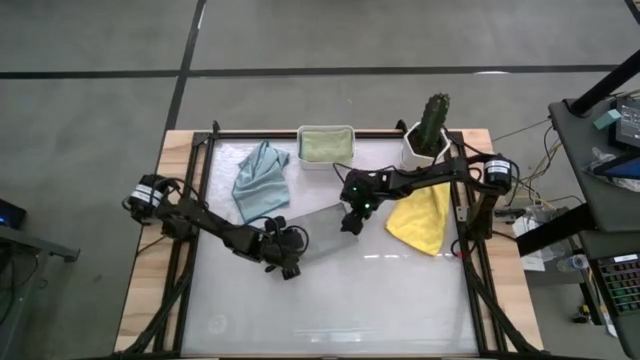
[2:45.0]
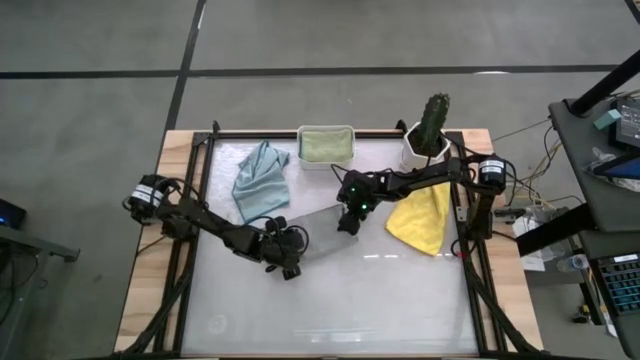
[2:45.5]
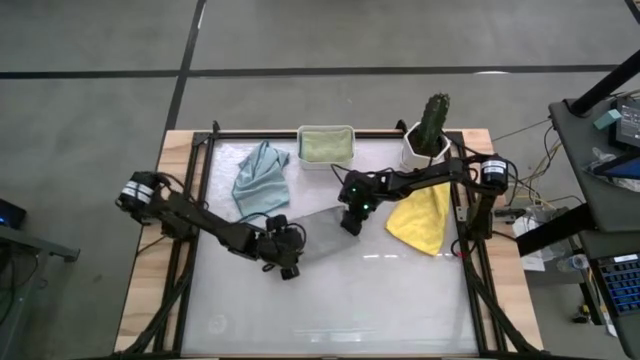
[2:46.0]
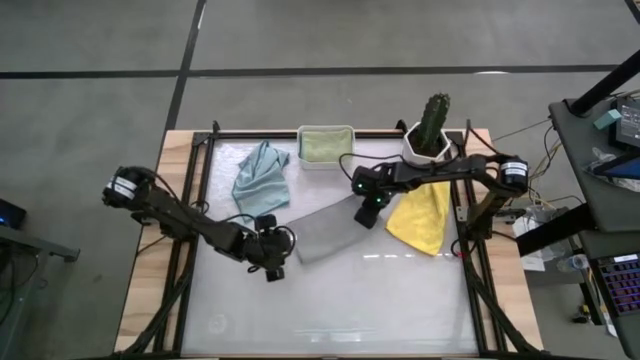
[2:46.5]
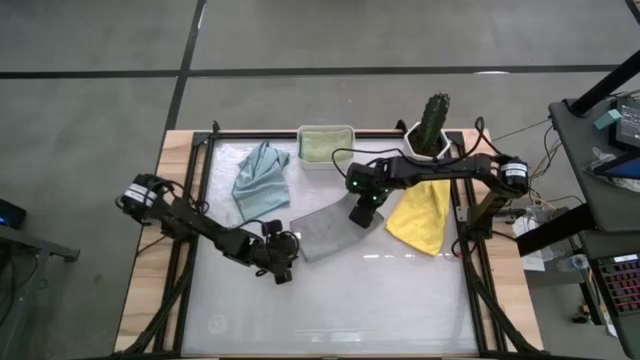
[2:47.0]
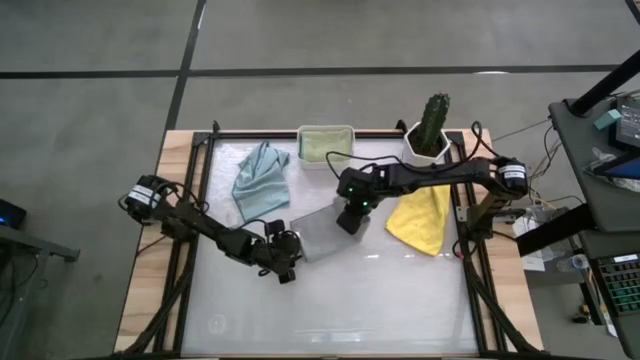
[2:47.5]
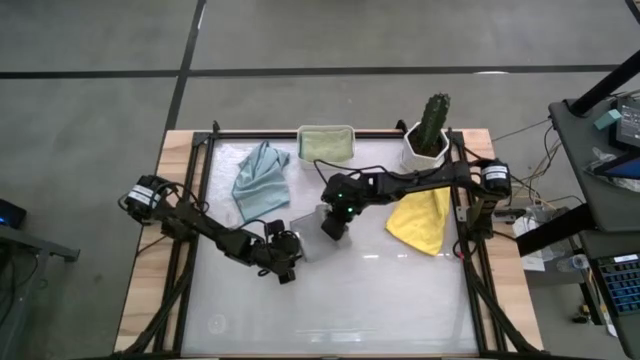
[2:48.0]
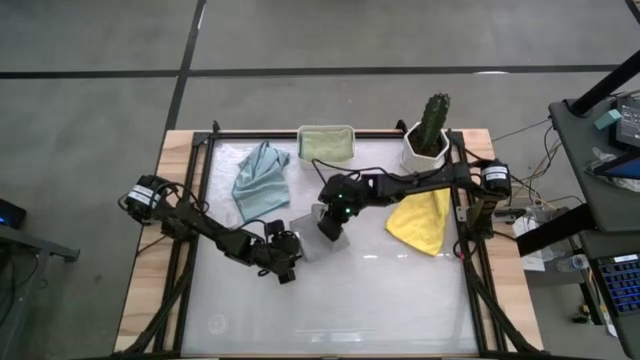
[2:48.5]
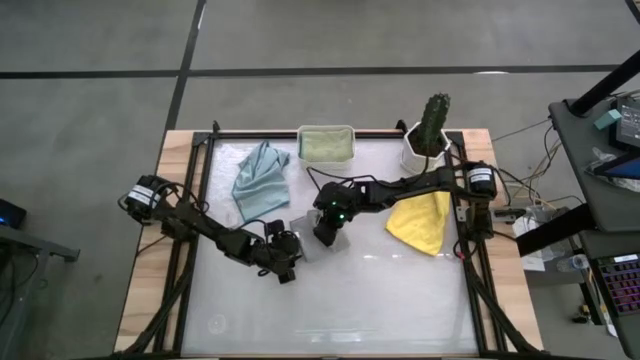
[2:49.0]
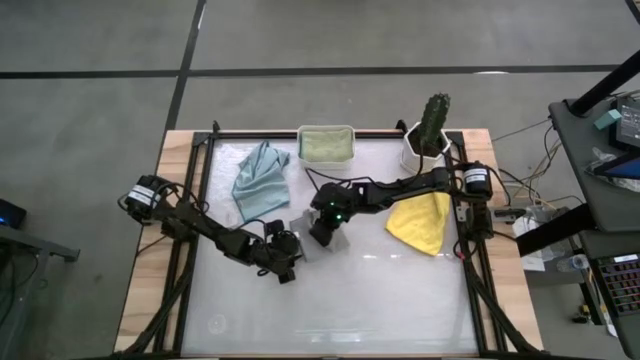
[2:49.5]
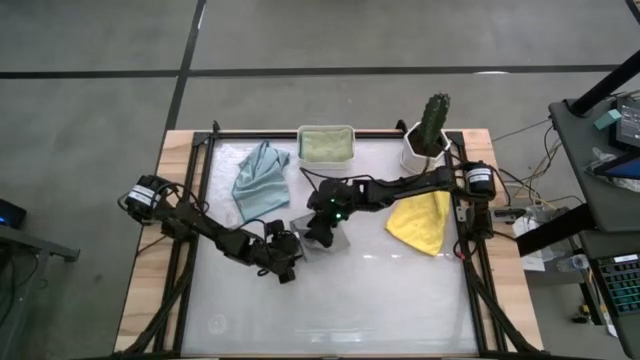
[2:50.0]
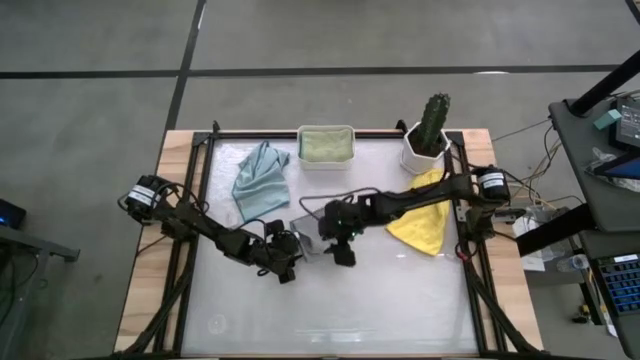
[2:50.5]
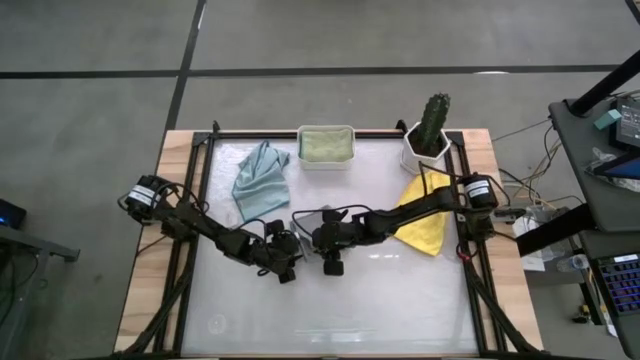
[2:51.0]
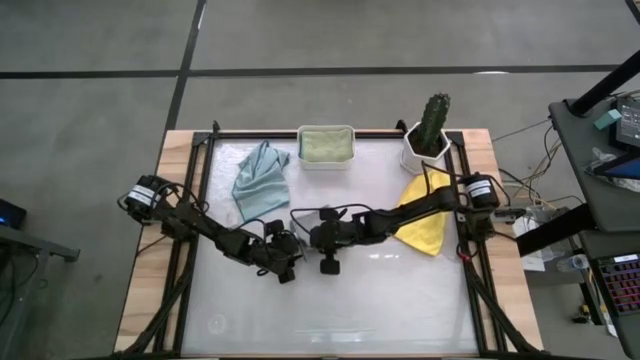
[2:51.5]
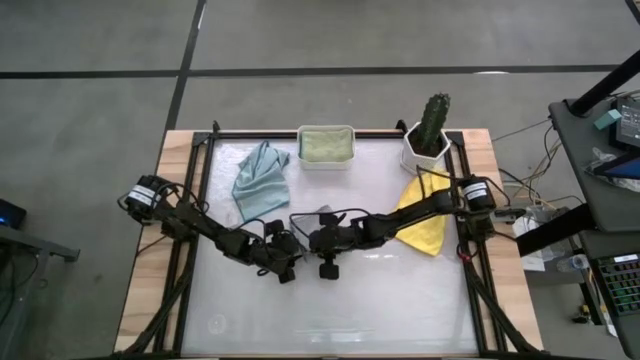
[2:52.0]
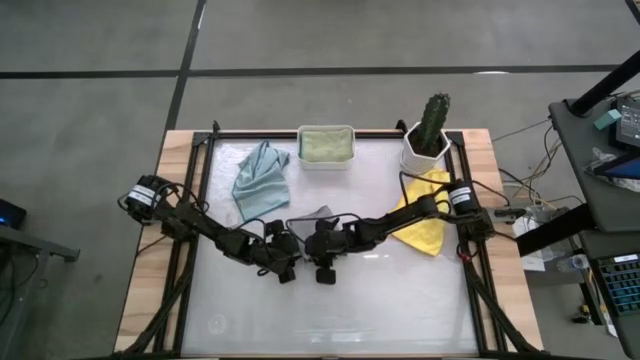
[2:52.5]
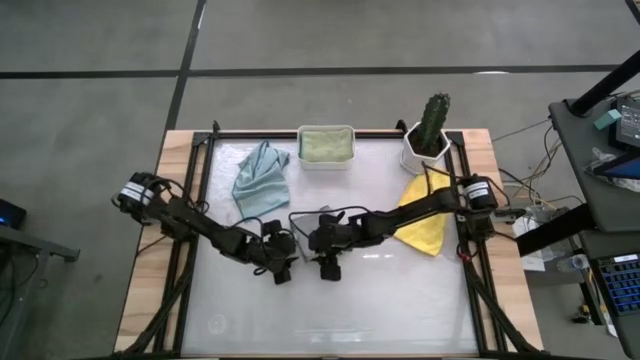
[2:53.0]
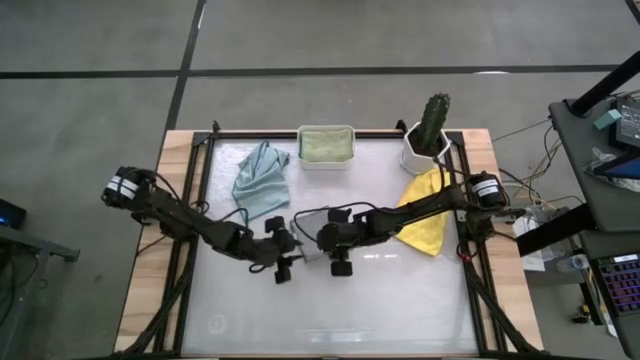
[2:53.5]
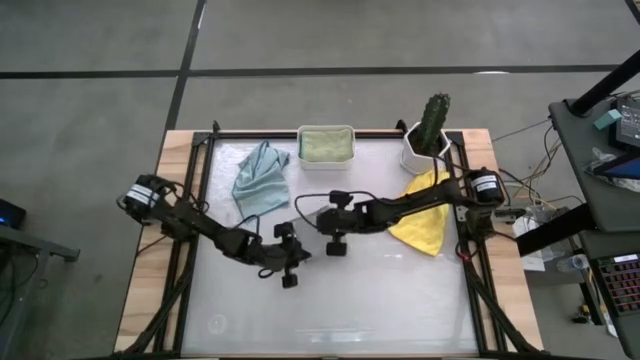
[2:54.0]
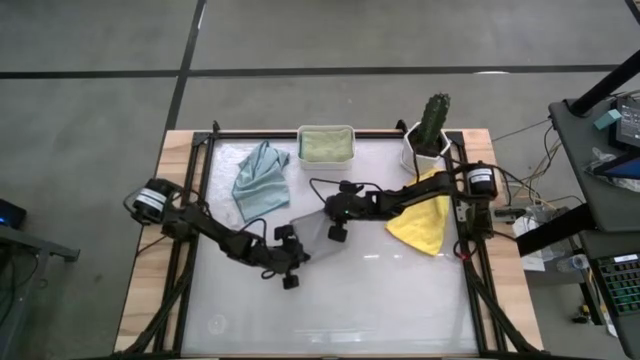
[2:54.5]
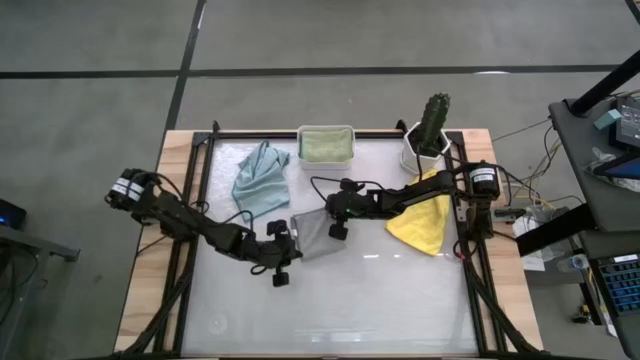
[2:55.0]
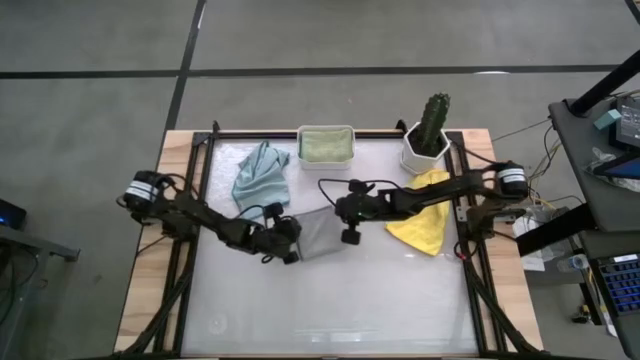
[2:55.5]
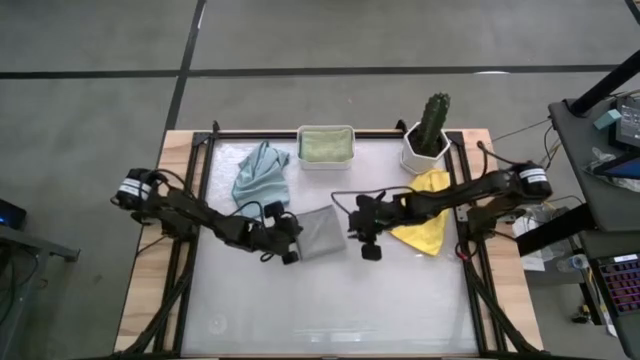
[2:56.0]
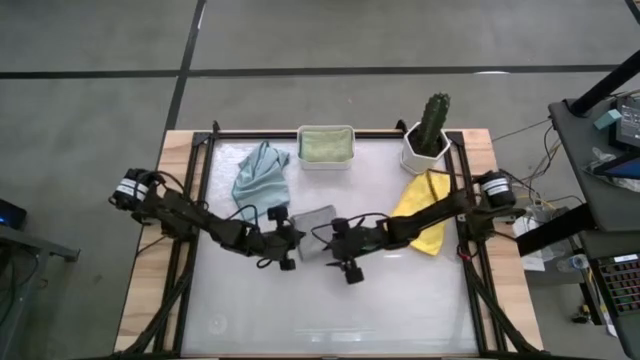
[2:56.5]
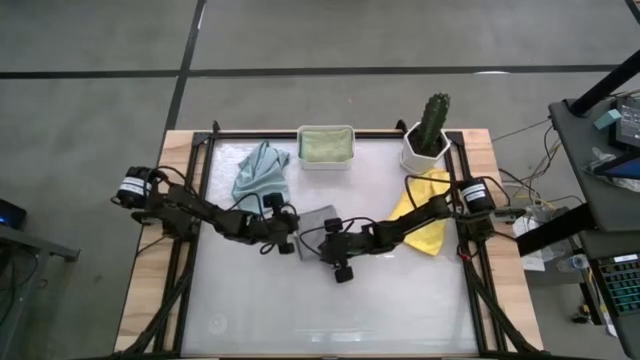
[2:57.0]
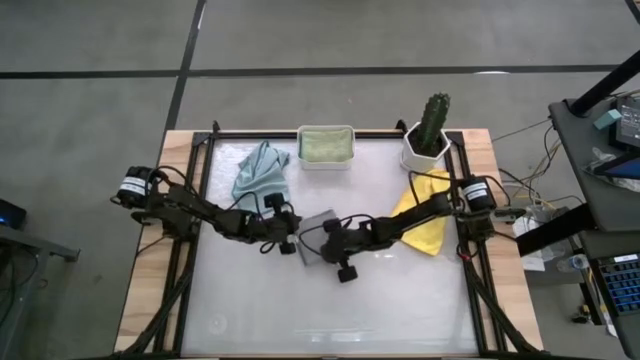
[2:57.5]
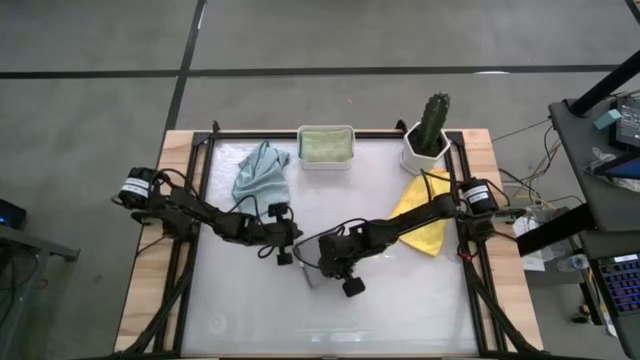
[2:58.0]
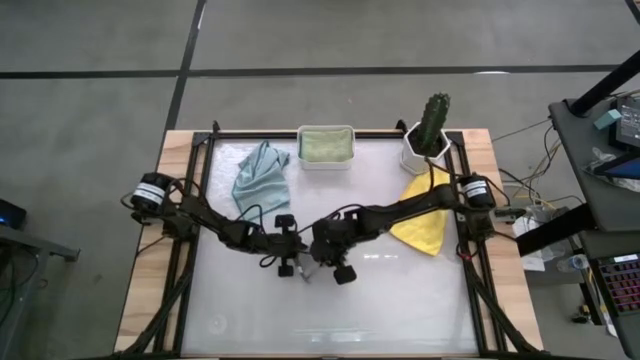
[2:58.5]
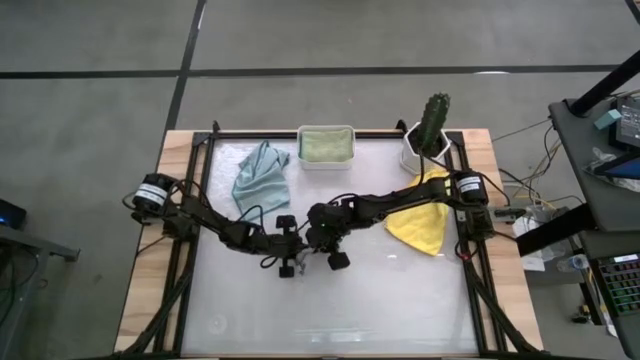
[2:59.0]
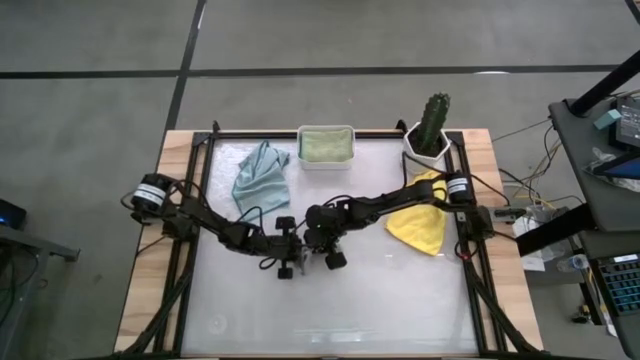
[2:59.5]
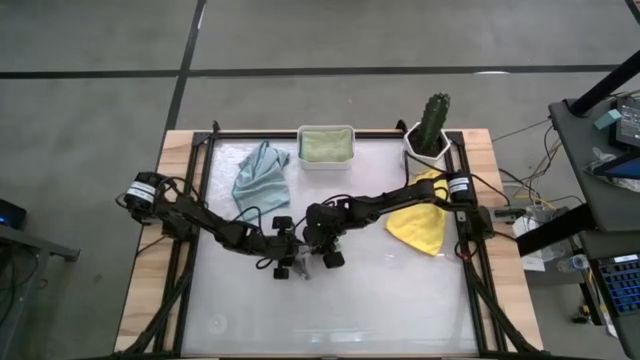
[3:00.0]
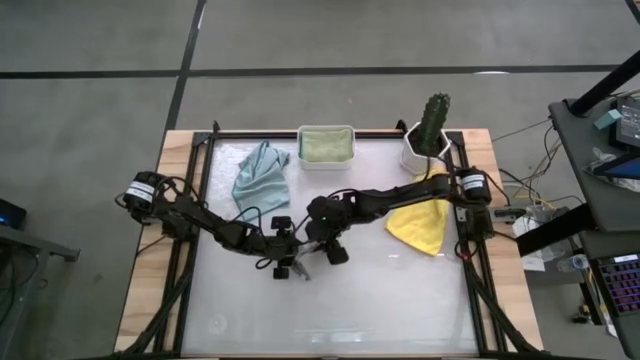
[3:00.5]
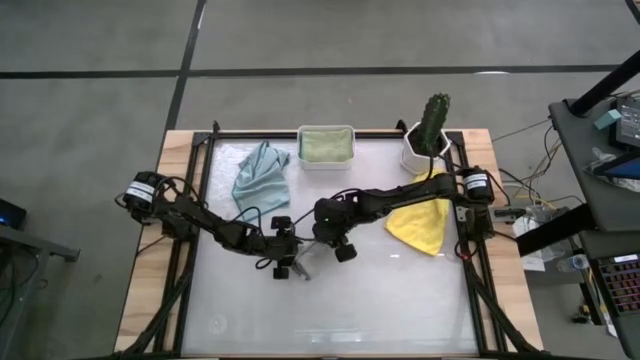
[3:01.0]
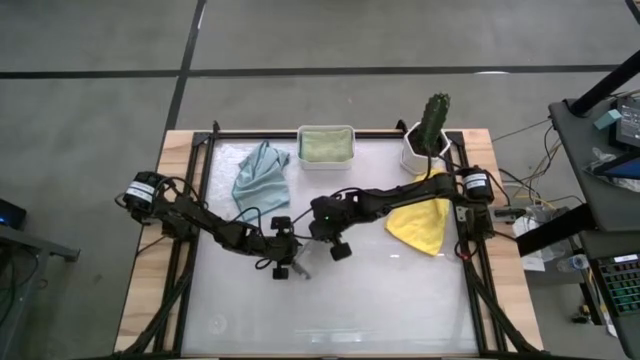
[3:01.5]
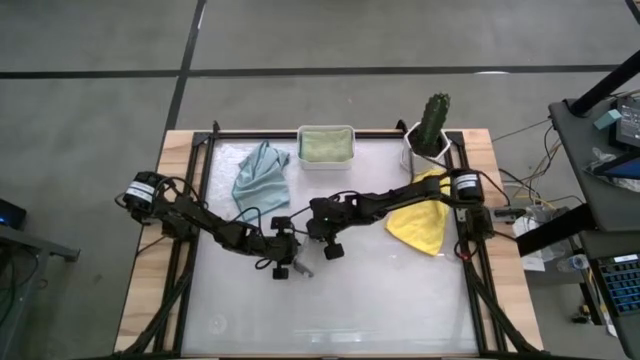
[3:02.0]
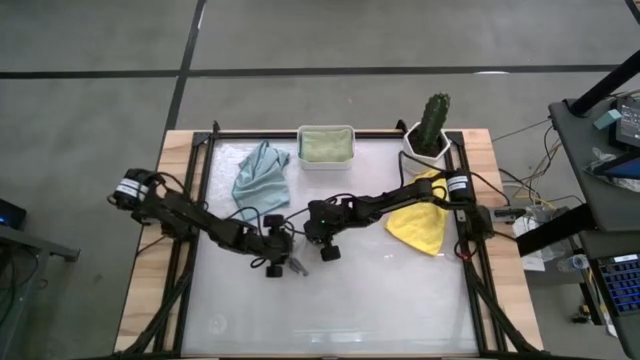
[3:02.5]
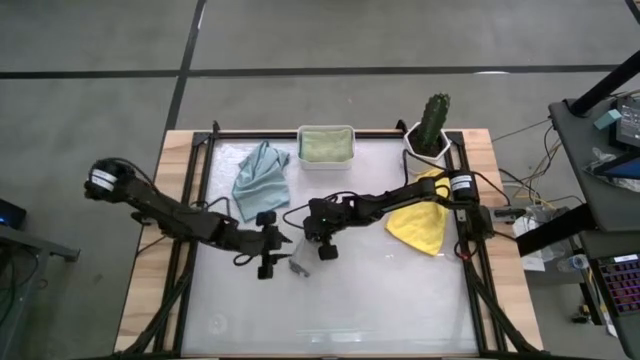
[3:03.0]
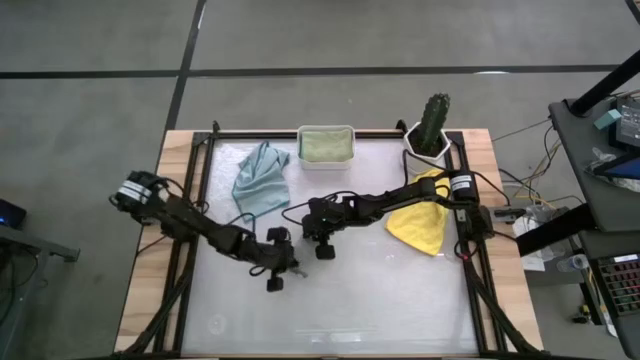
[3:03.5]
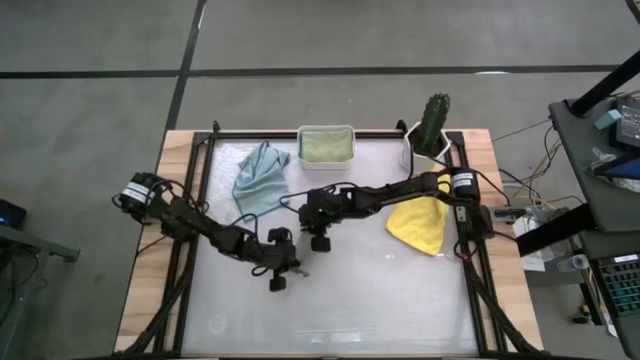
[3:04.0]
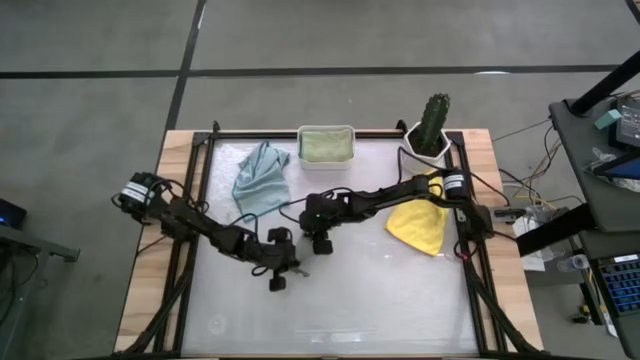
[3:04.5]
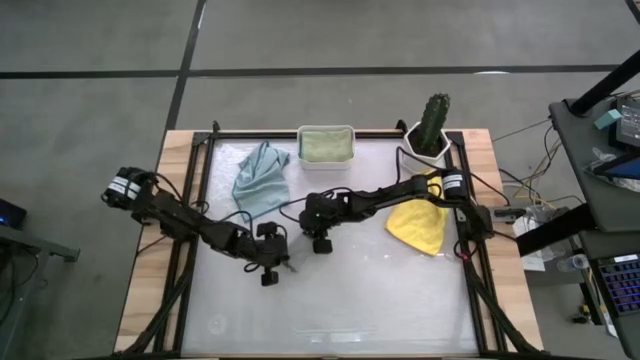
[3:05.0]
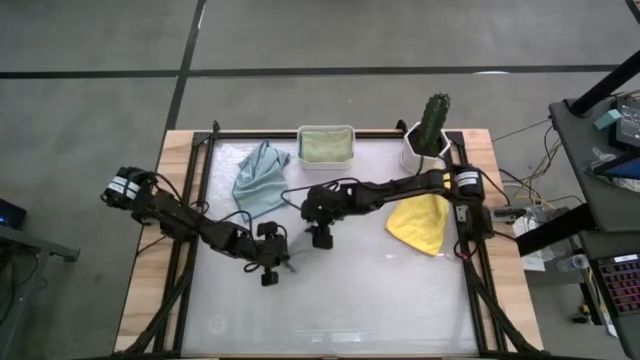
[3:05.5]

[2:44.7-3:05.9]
Task: Fold microfiber towels
Fold the gray cloth
